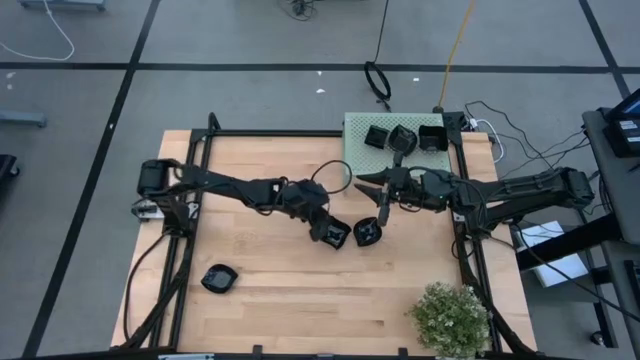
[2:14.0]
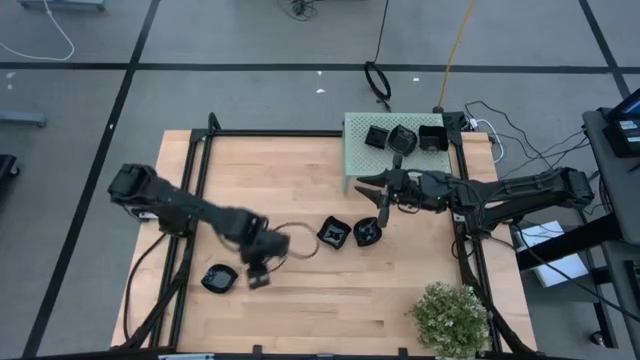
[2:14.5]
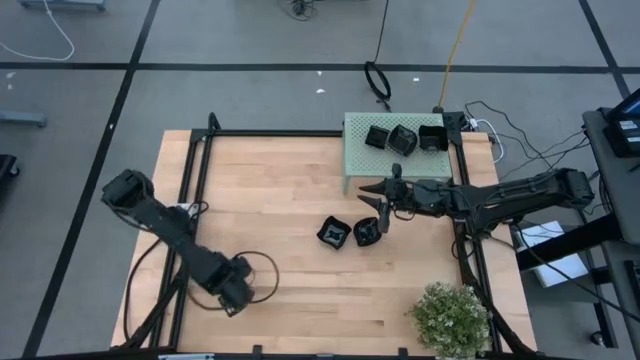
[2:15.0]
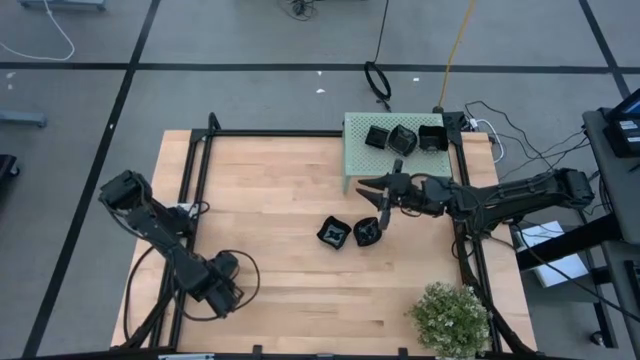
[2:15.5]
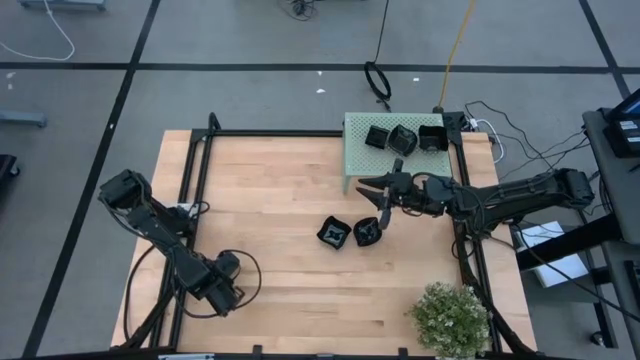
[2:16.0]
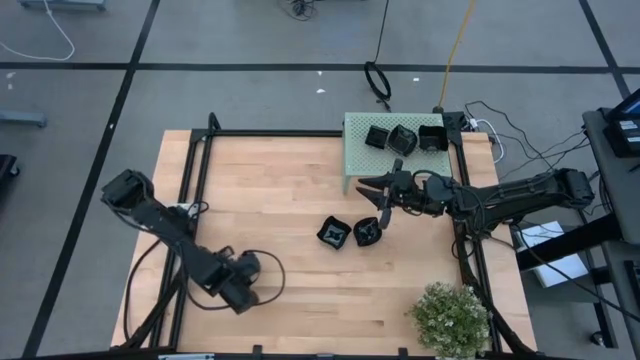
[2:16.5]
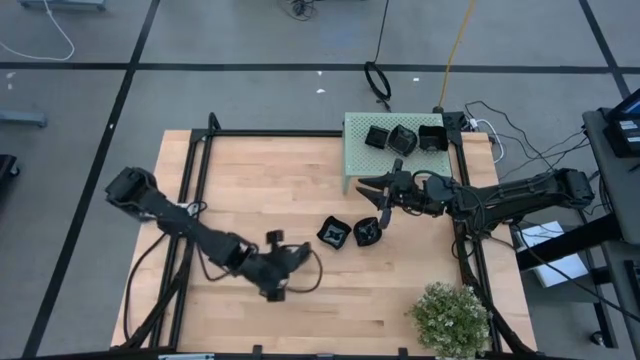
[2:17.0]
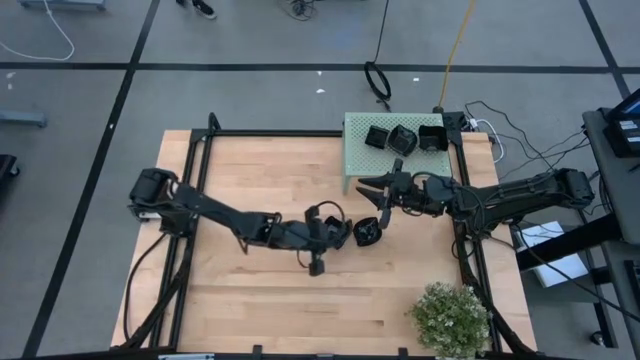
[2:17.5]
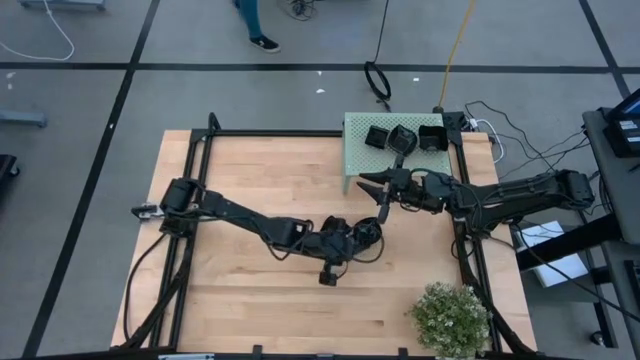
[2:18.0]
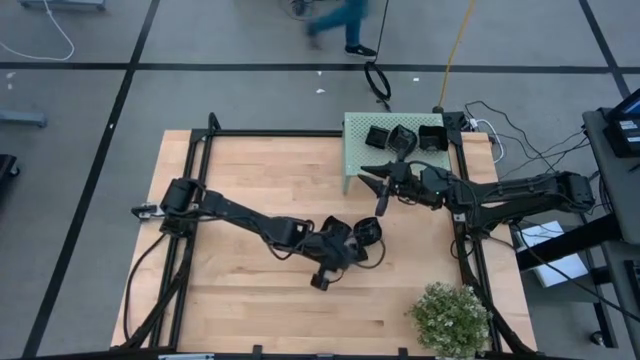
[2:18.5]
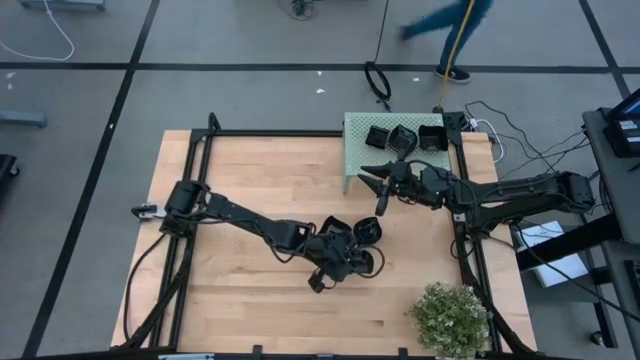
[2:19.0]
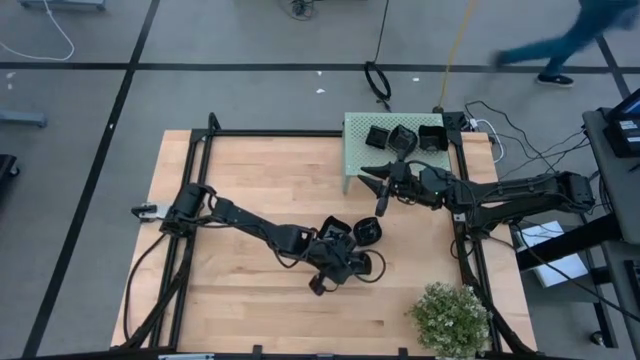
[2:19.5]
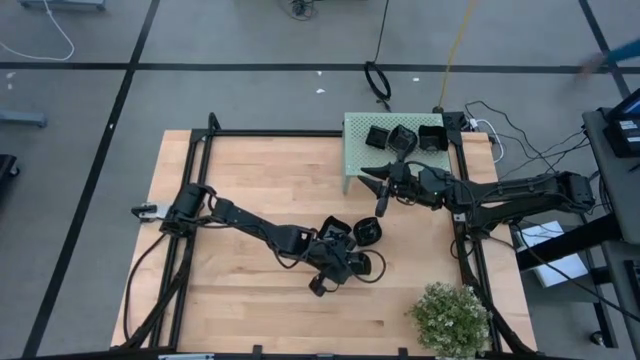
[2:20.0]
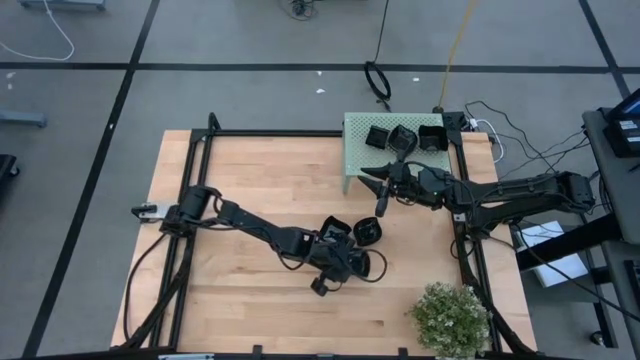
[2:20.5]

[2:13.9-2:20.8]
Task: Pick & Place Mini shaped plates
Move the bottom leaf-shaped plate to the center of the table

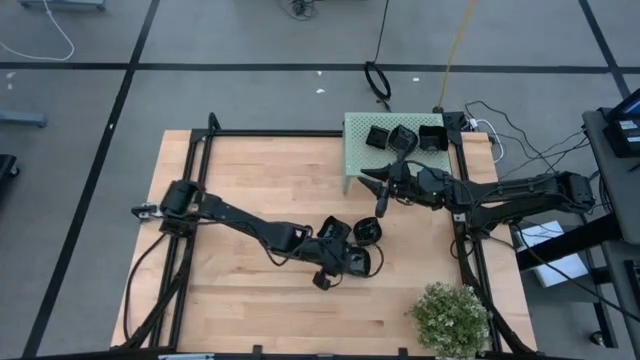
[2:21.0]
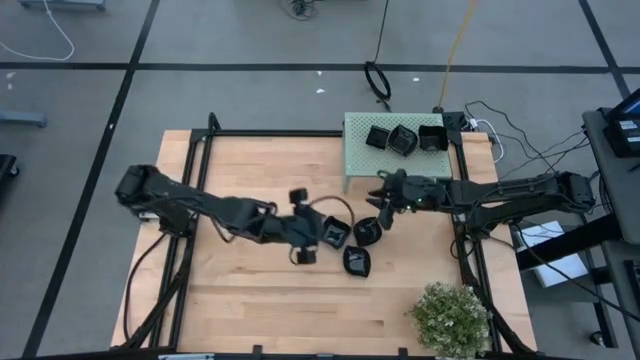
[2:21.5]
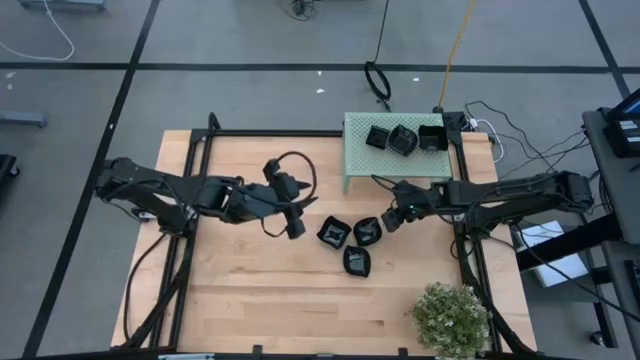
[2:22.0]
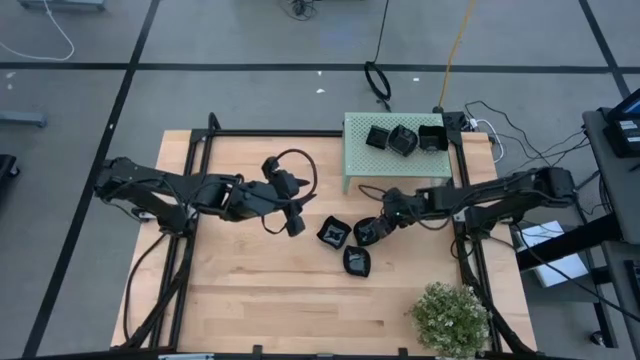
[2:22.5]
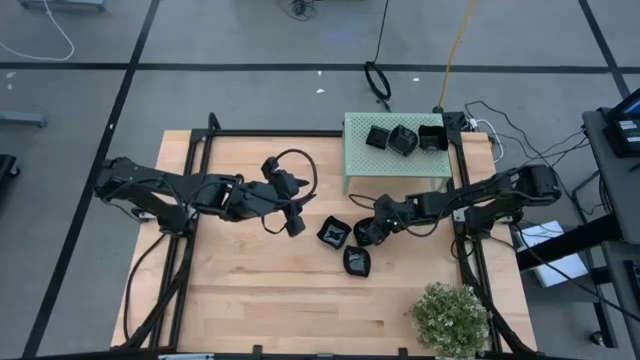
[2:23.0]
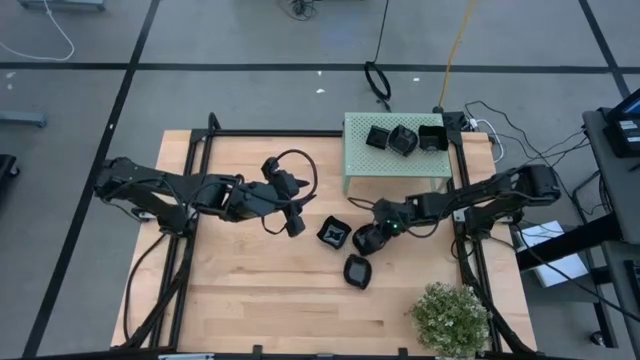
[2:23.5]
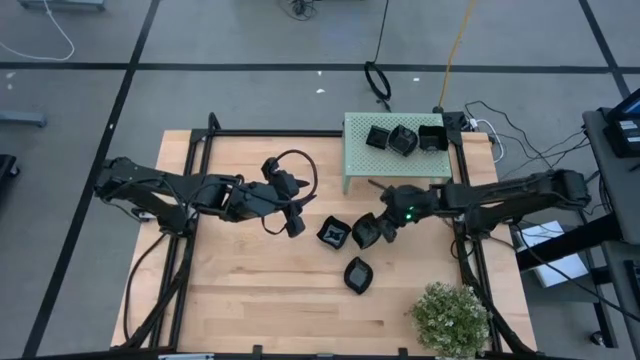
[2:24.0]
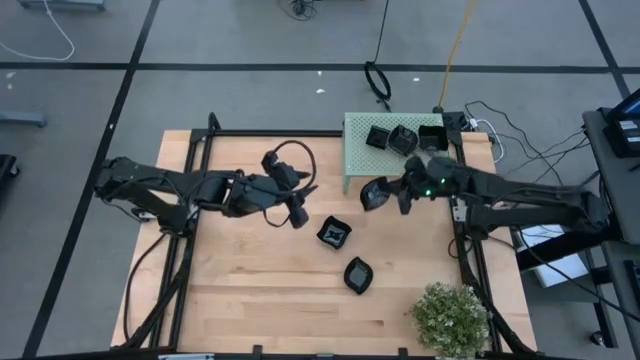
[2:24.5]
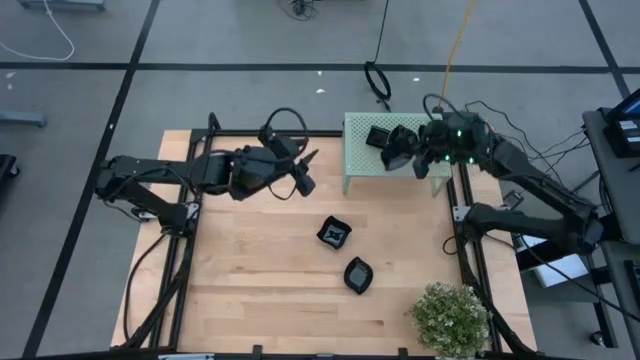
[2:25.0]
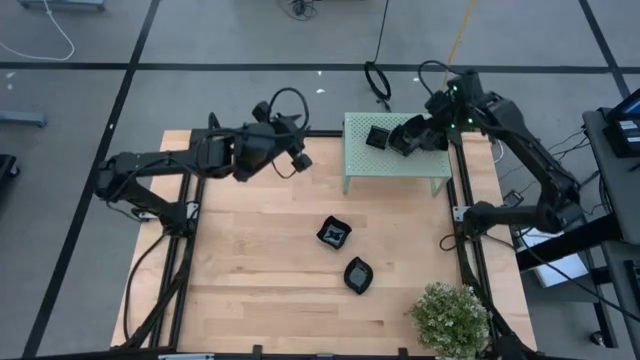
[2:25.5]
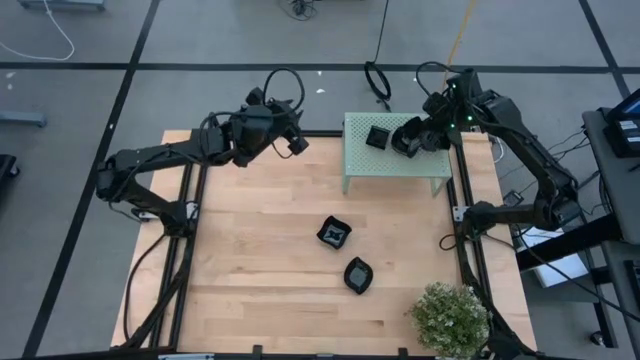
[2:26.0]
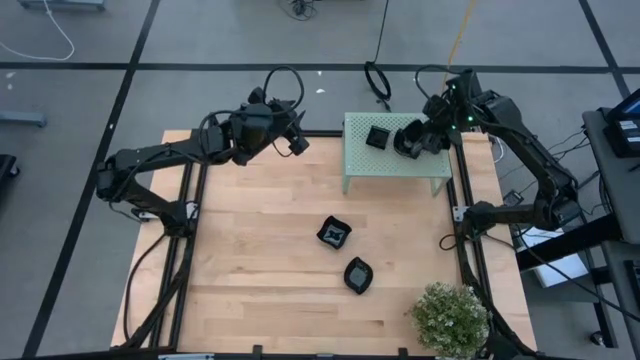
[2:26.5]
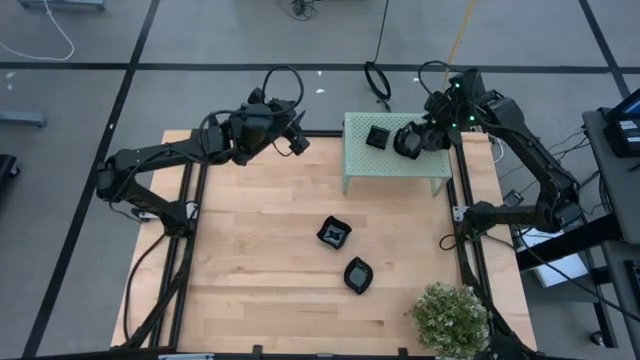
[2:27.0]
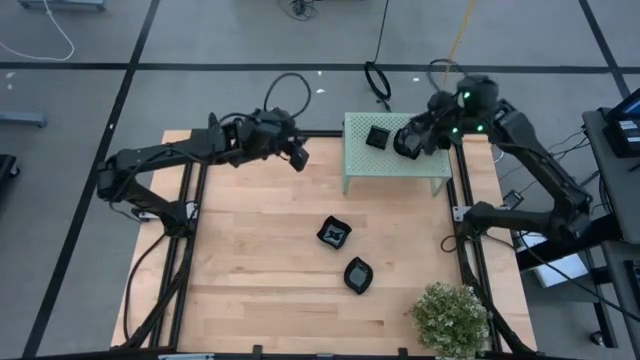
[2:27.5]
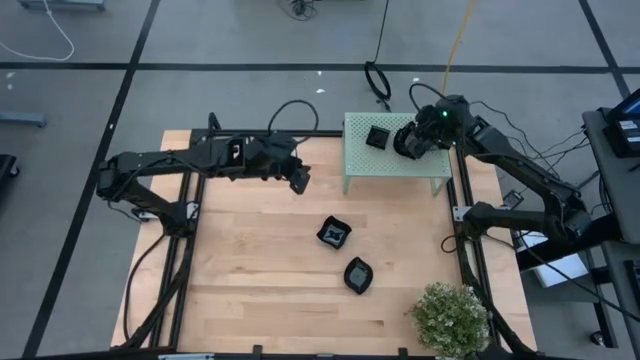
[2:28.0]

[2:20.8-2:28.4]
Stack the top leaf-shaped plate on top of the leaf-shaped plate on the shelf

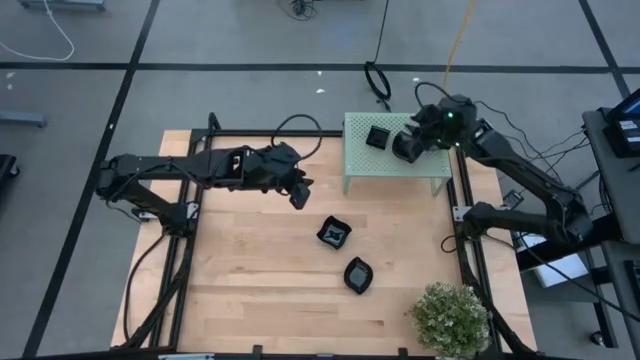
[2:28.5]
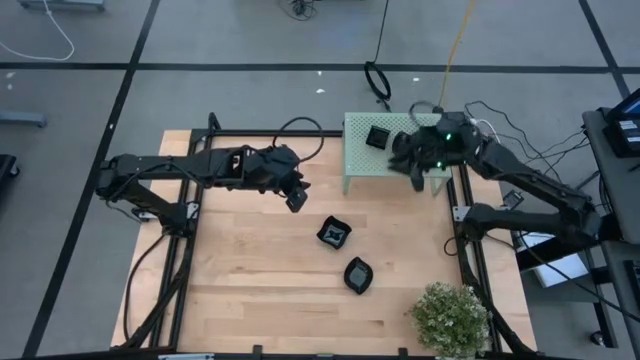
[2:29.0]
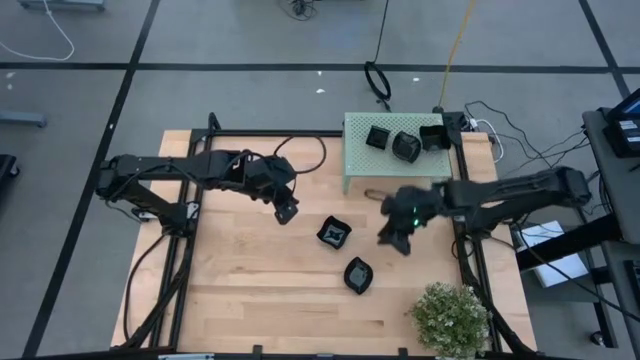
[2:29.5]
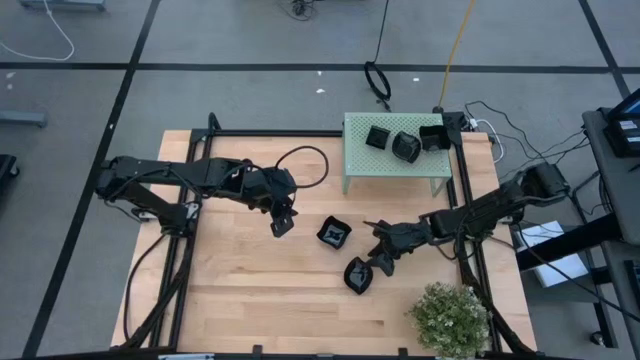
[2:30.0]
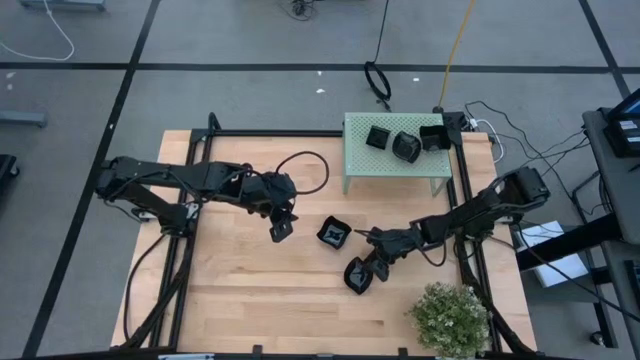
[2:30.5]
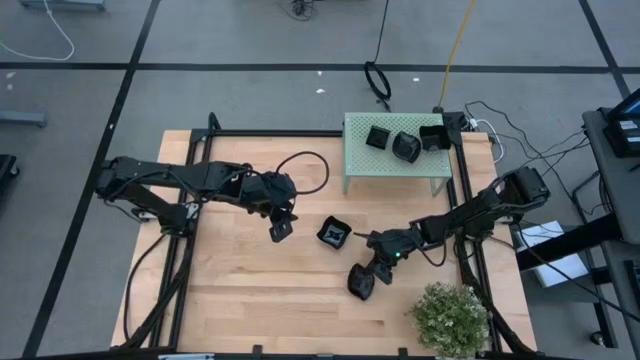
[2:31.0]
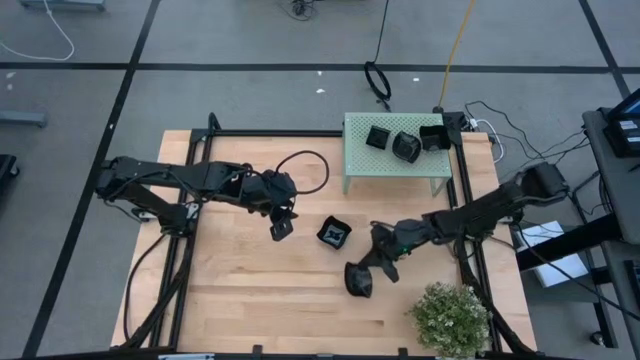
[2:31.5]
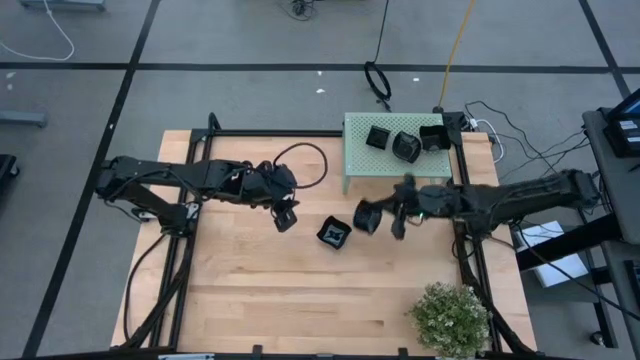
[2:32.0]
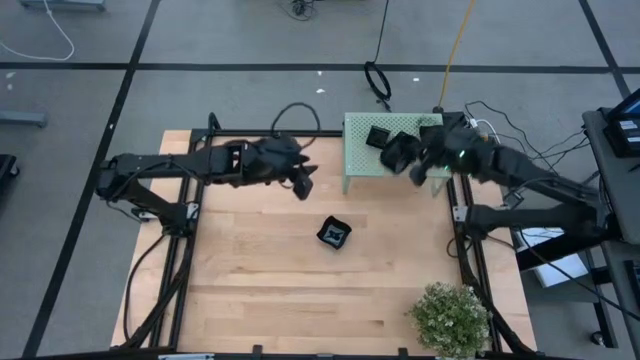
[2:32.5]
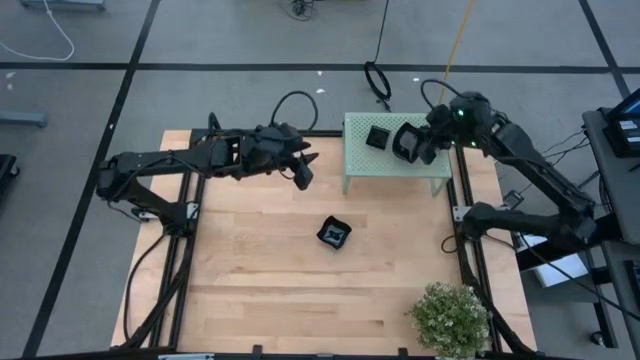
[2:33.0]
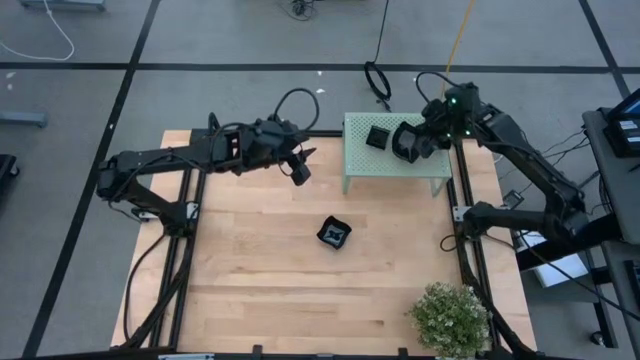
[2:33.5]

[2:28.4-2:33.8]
Stack the leaf-shaped plate on top of the leaf-shaped plate on the shelf
